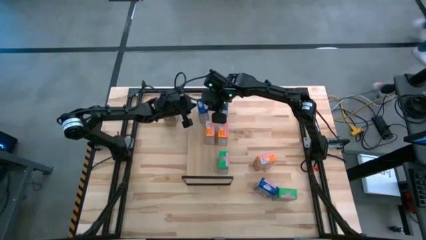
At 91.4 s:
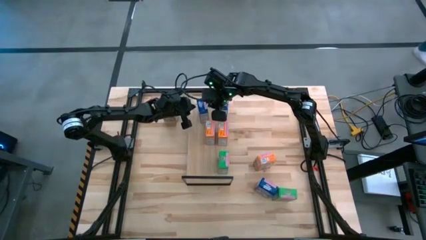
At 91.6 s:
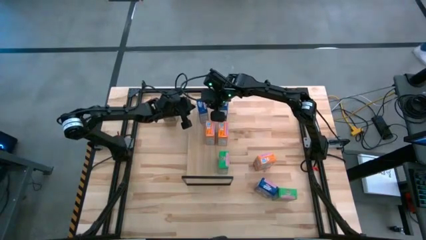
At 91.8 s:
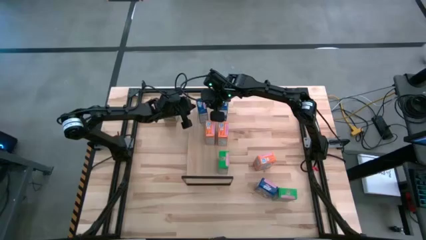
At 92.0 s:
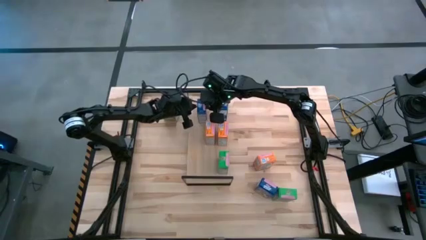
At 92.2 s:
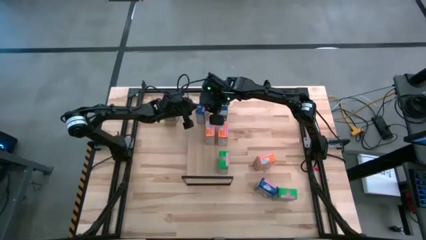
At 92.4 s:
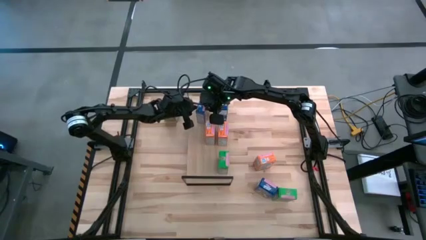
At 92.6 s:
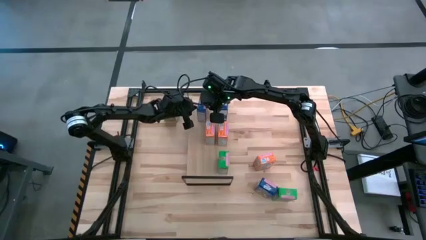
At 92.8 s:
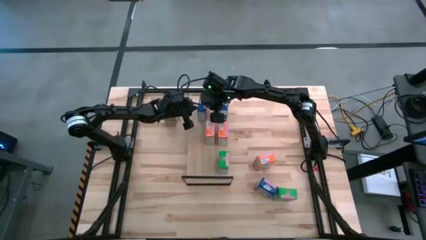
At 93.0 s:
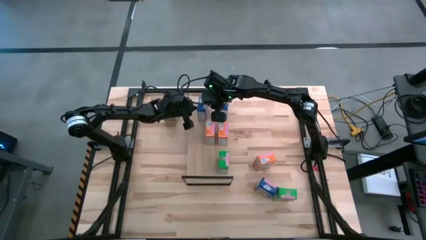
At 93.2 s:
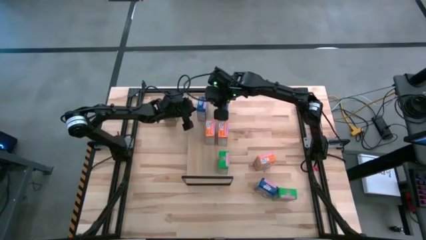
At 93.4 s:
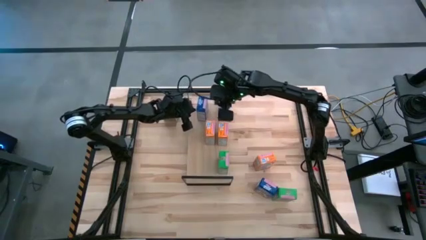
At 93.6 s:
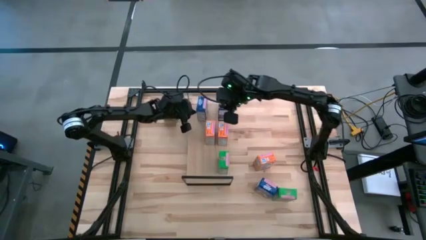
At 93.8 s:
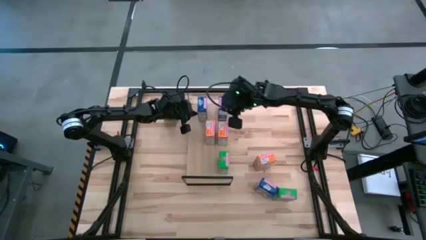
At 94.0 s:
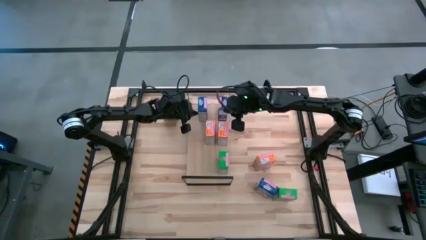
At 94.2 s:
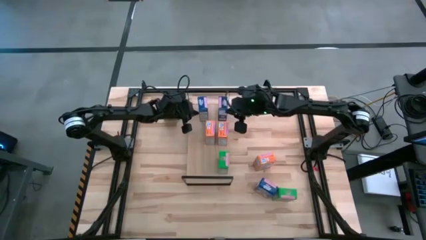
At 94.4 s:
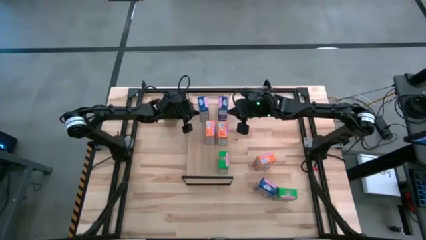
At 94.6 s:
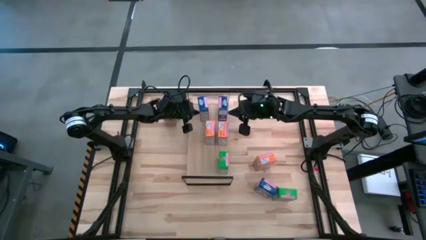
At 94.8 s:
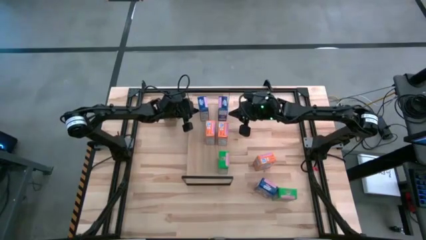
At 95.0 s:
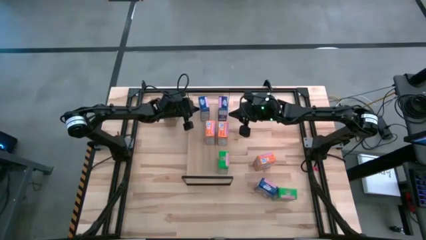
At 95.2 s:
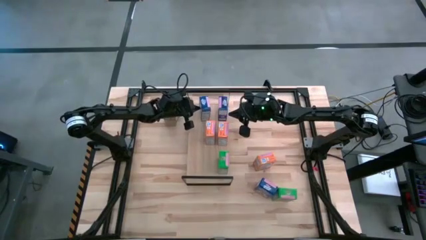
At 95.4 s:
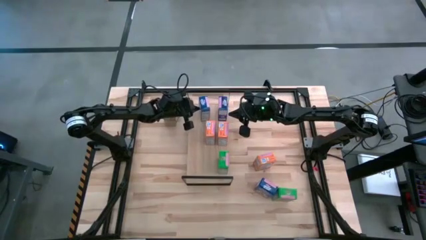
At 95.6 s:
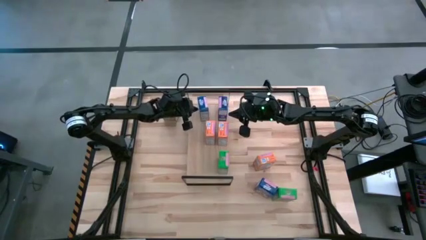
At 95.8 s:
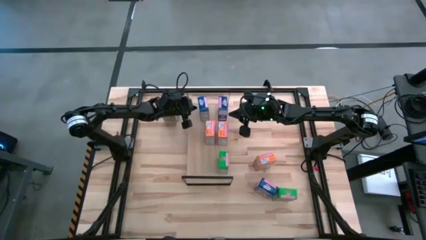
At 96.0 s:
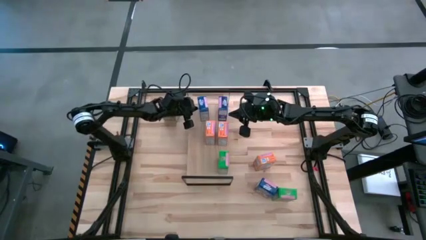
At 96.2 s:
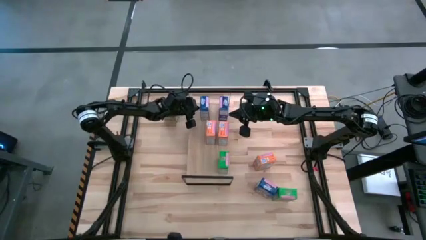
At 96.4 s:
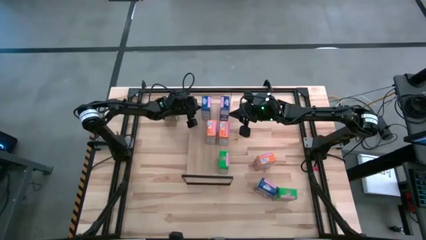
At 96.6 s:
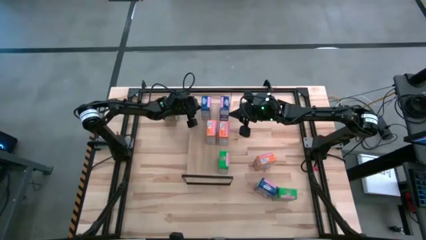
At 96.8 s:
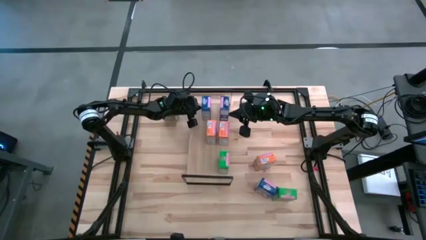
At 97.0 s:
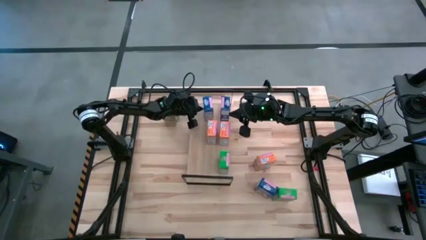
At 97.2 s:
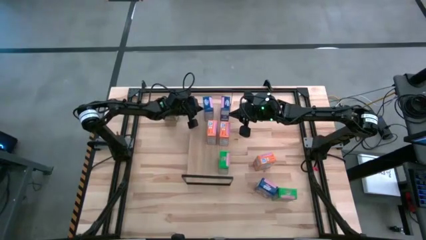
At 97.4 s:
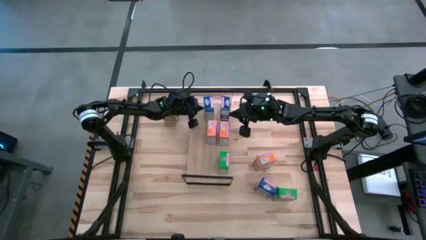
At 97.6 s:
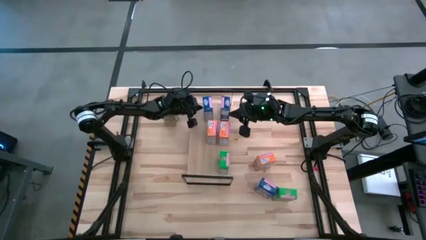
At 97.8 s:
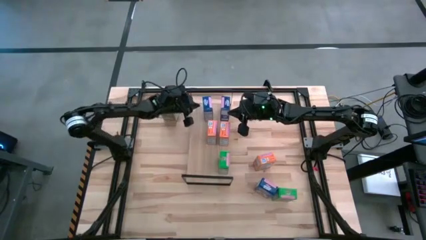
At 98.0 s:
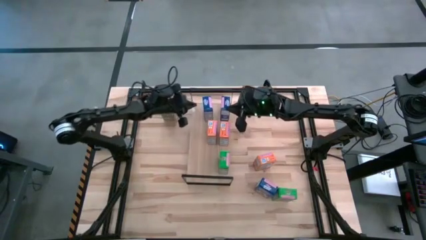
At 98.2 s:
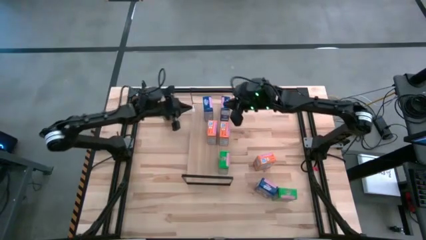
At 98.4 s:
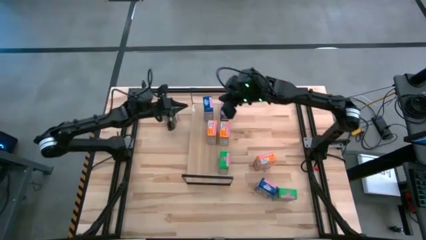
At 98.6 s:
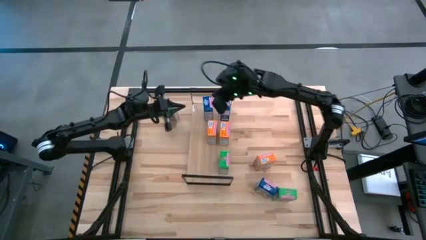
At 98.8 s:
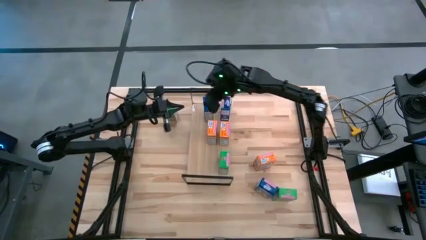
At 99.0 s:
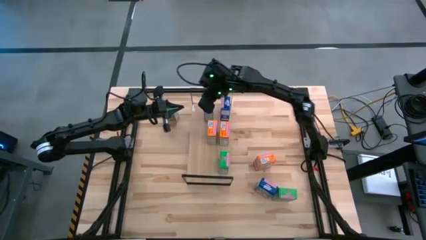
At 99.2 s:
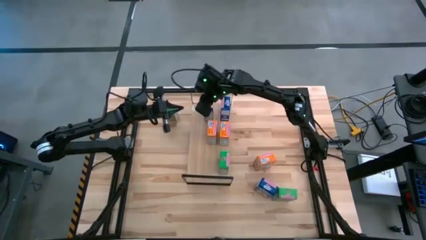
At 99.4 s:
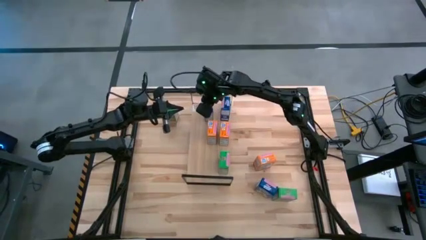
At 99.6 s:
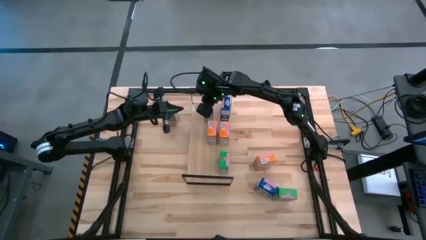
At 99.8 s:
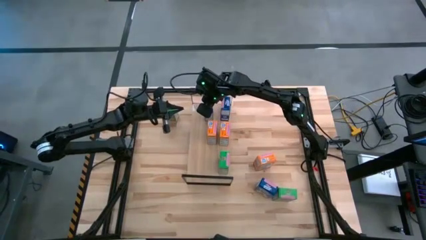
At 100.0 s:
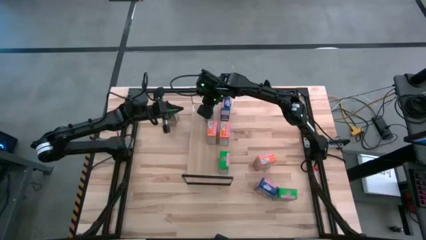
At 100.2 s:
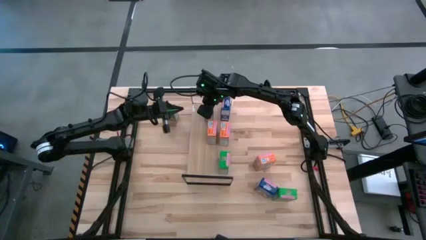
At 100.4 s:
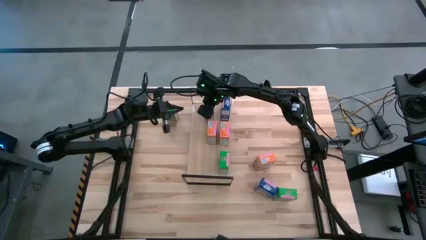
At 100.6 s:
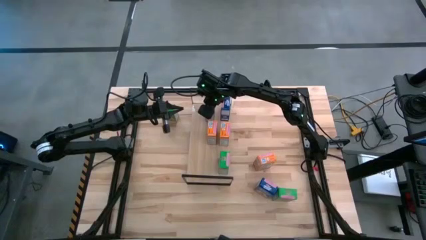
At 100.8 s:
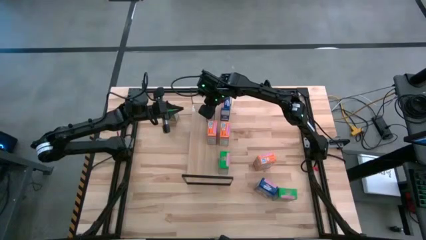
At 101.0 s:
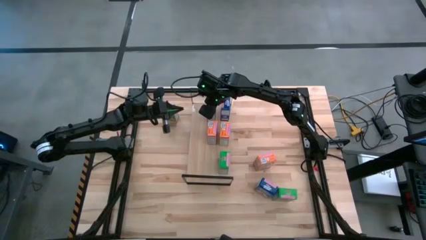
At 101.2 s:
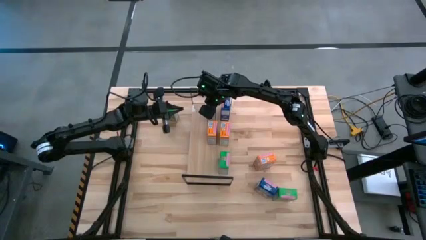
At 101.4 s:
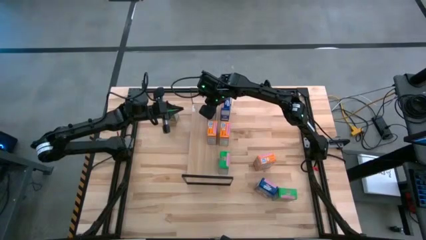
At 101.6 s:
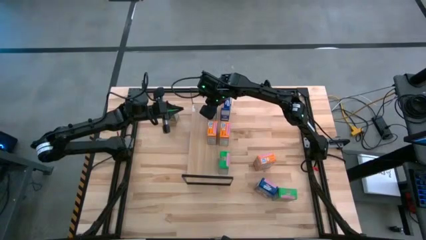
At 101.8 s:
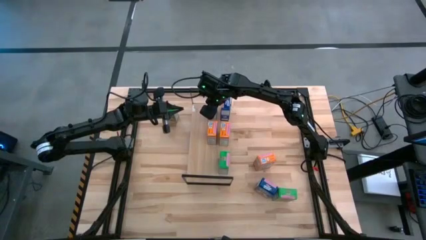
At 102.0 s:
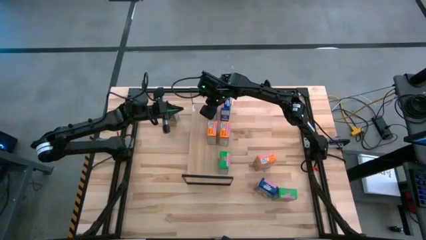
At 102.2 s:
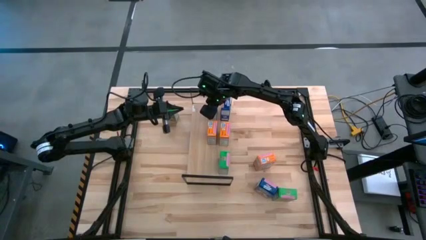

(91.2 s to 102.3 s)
Task: Stack cereal on shelf
Put the top blue cereal box on the shelf aligned with the other blue cereal box

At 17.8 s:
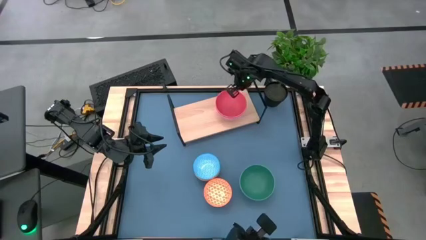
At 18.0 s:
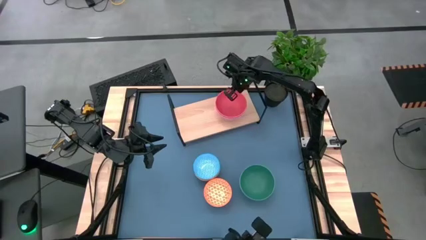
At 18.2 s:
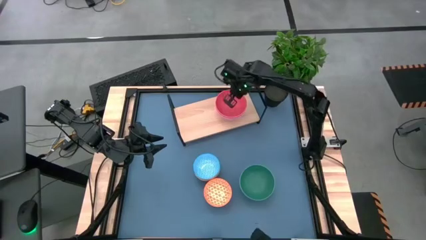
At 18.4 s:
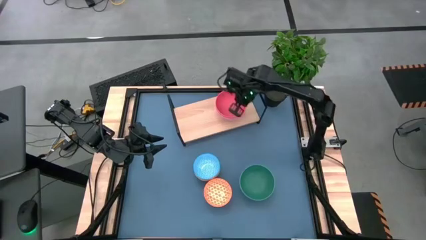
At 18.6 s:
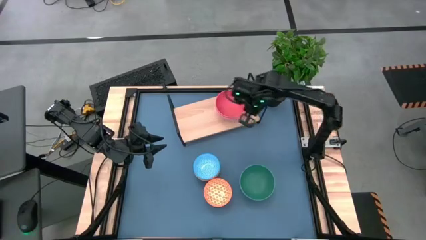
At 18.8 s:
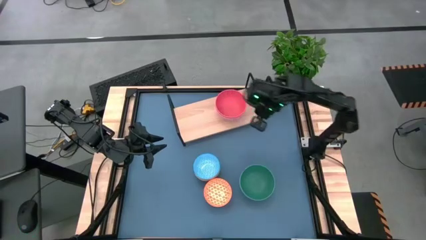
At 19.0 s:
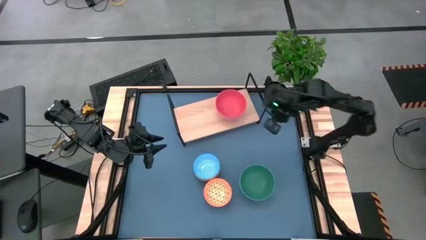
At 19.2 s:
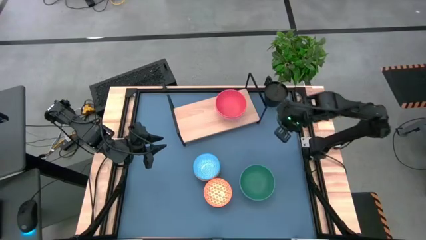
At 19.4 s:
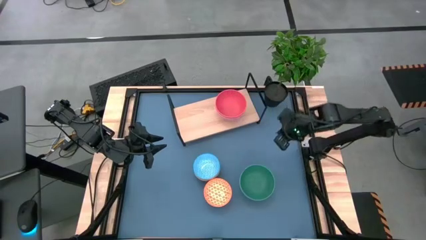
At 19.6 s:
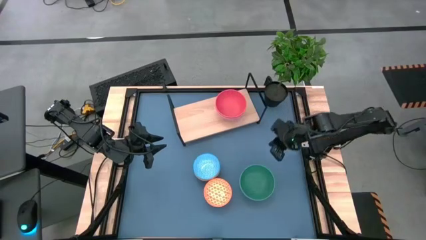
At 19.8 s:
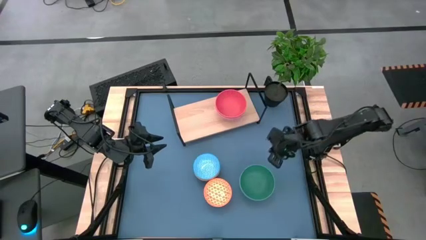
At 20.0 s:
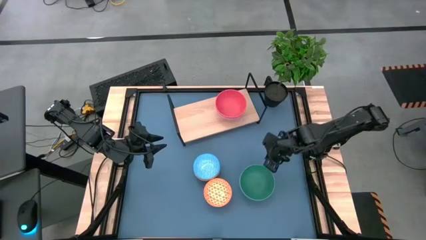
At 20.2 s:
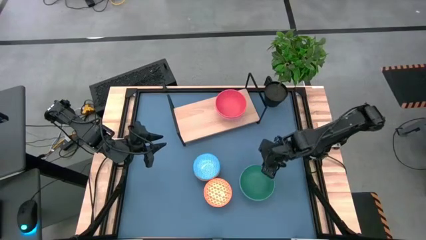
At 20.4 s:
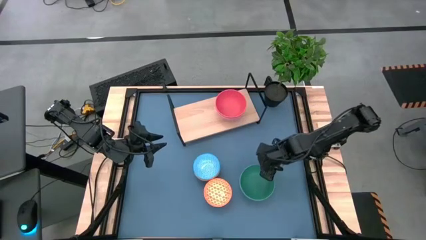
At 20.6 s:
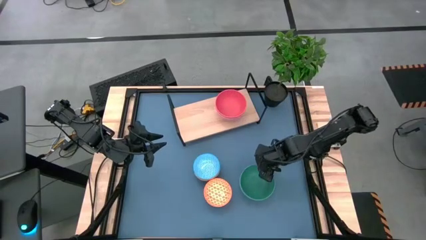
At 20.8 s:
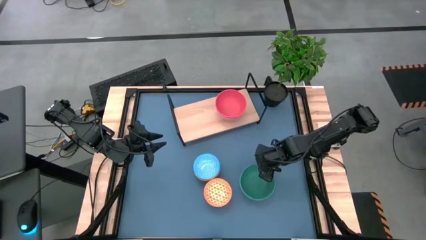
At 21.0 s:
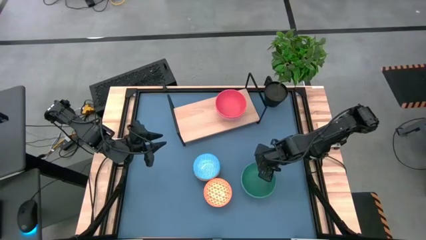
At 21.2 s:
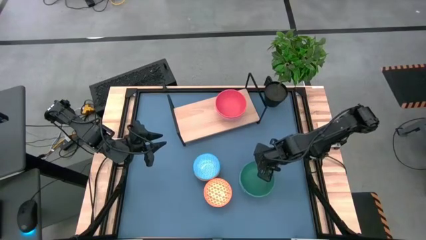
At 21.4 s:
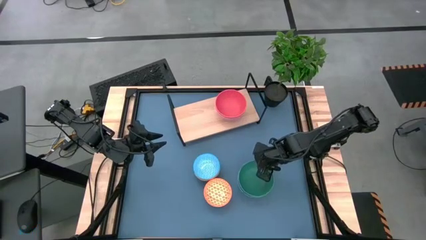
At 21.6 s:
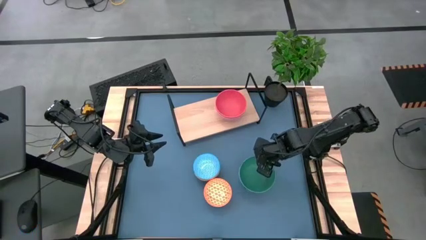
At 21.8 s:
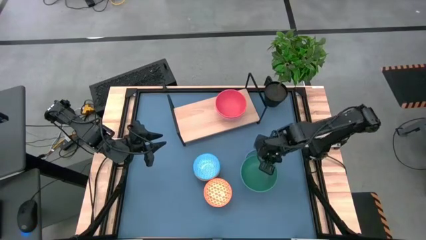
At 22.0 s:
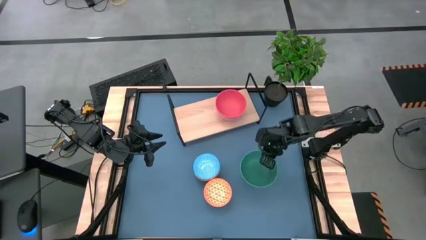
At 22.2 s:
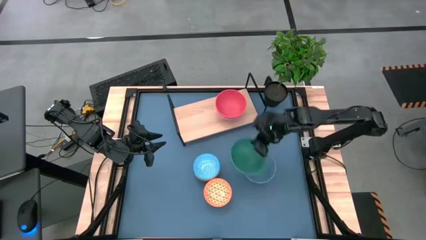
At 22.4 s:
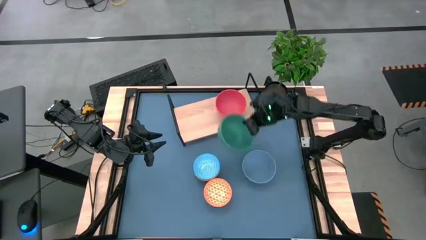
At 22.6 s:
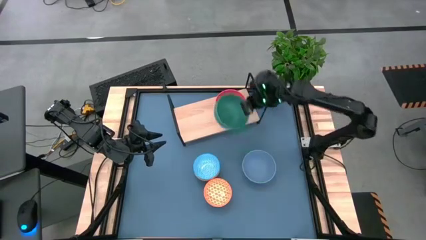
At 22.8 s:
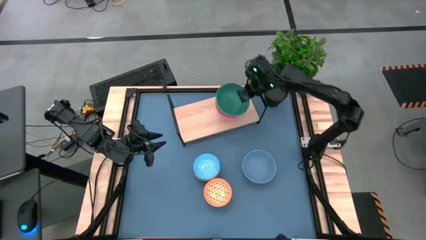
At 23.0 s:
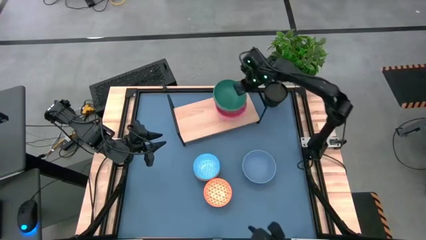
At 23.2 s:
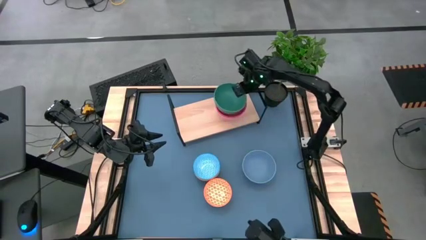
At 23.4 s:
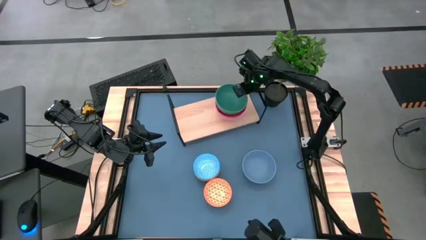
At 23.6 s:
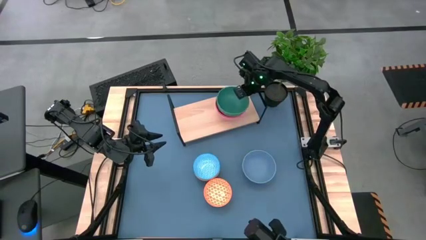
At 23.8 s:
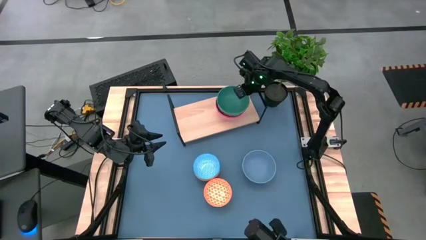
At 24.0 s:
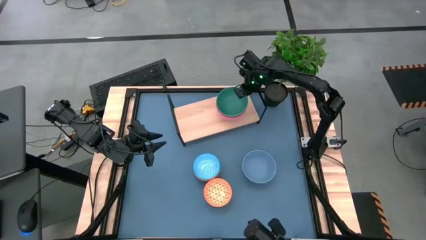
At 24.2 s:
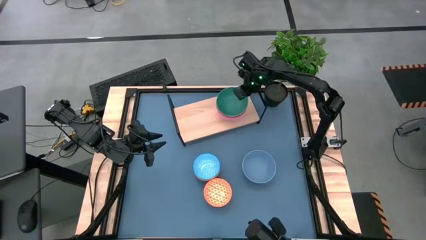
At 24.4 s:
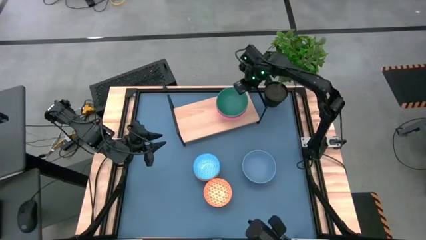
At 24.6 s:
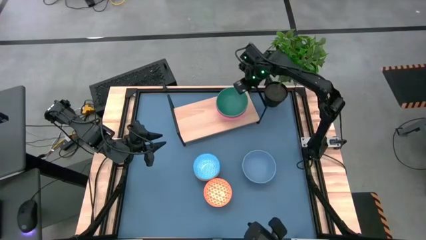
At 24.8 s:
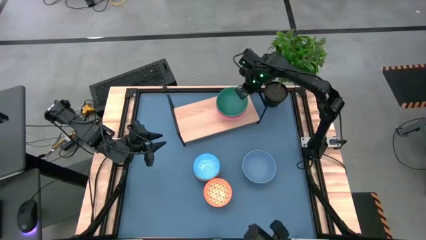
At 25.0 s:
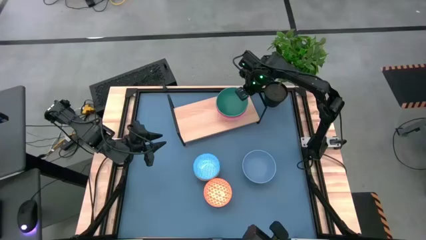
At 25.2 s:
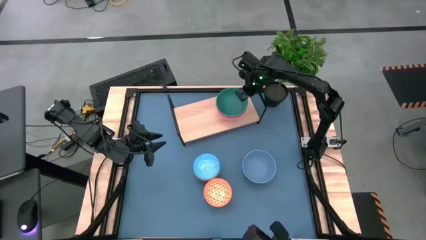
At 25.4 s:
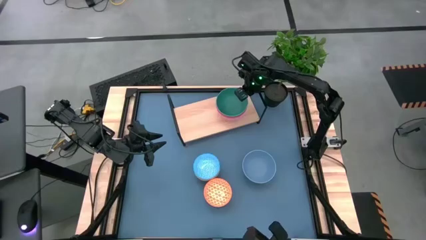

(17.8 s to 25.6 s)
Task: Place and stack bowls onto a shelf
Stack the green bowl on top of the orange bowl on the shelf
